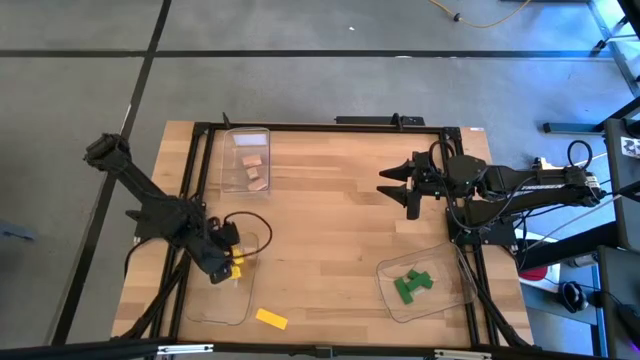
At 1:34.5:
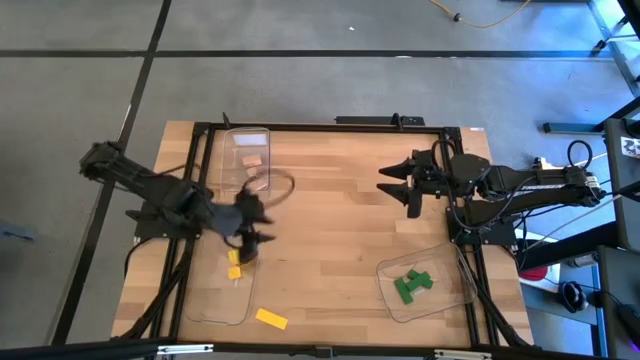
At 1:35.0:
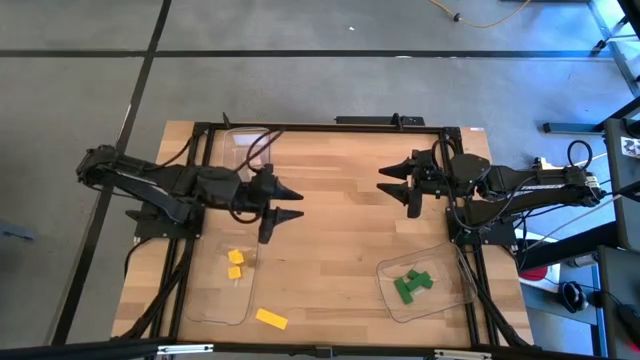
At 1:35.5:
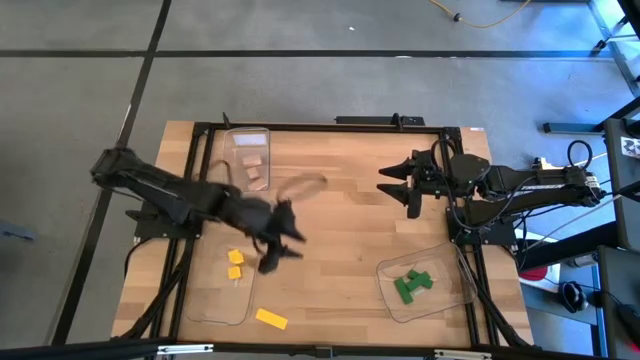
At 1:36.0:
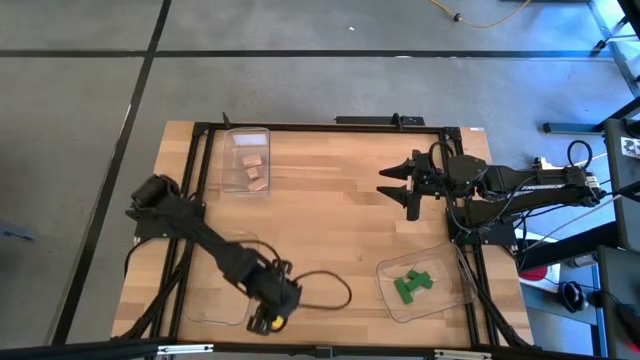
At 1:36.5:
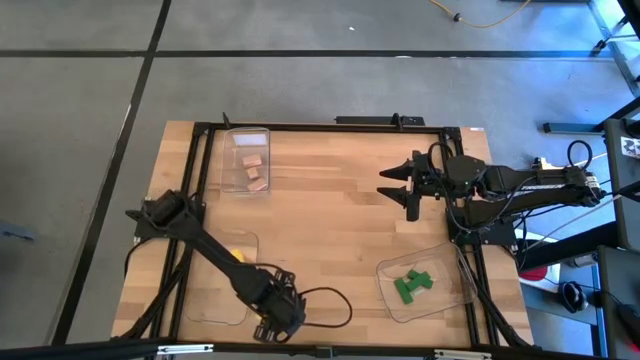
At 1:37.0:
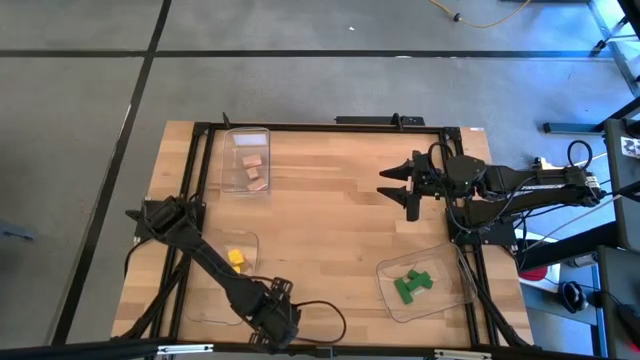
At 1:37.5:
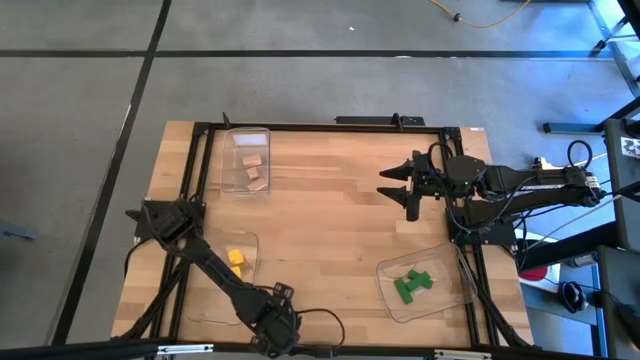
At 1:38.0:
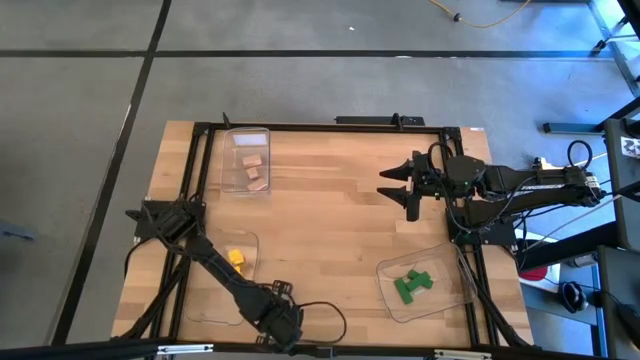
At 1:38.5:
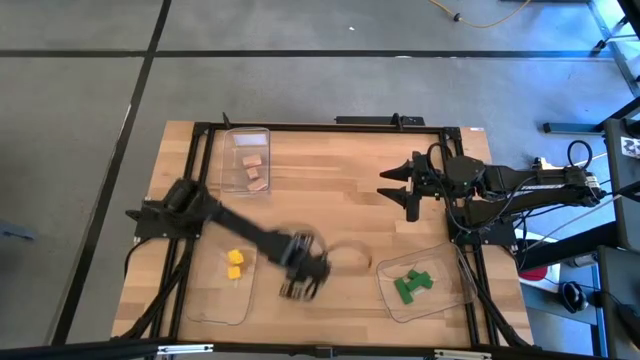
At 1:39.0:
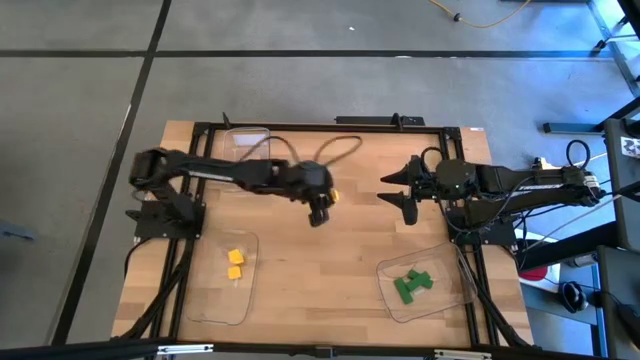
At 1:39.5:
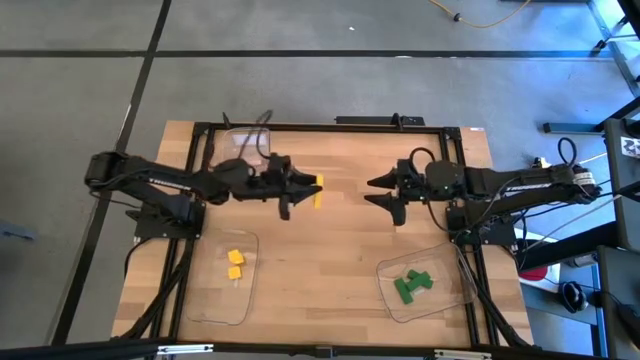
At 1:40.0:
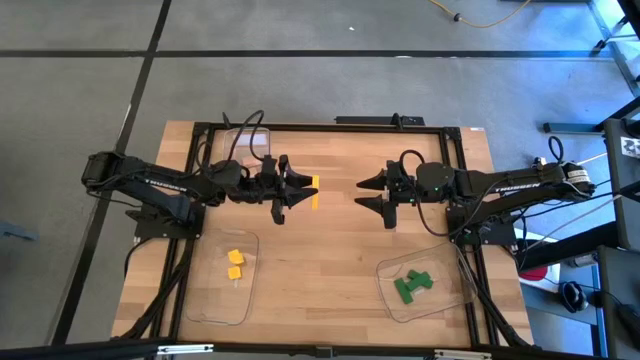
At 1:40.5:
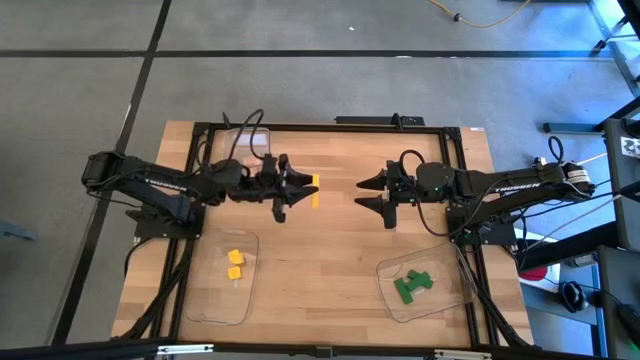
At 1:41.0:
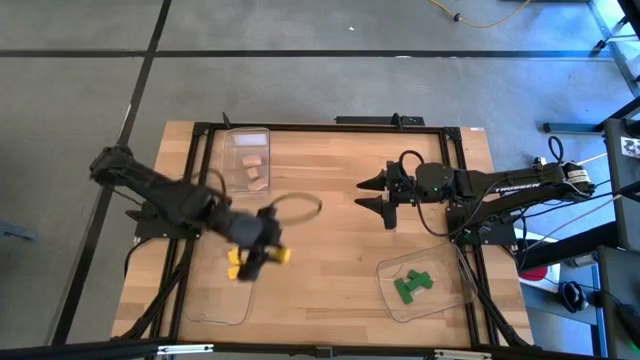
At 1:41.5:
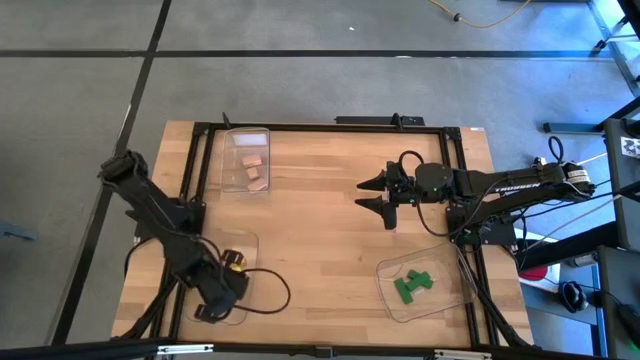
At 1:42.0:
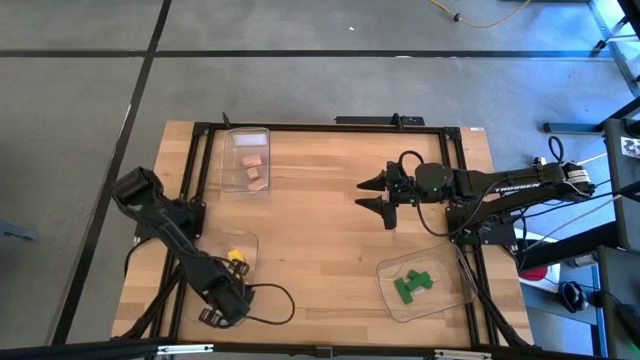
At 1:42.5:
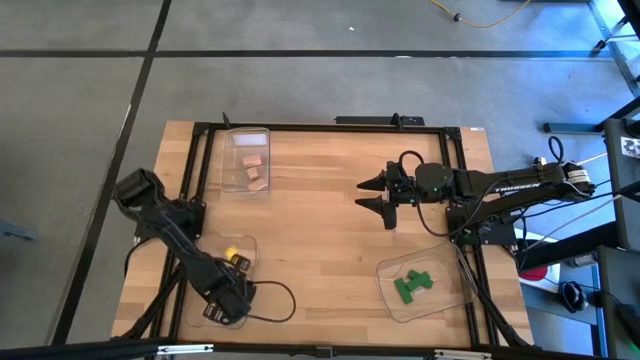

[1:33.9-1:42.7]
Task: Sort & place blocks by color
Put the bottom yellow block into the bottom left transparent bin

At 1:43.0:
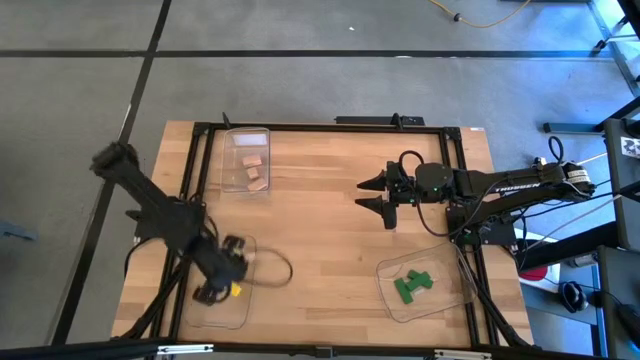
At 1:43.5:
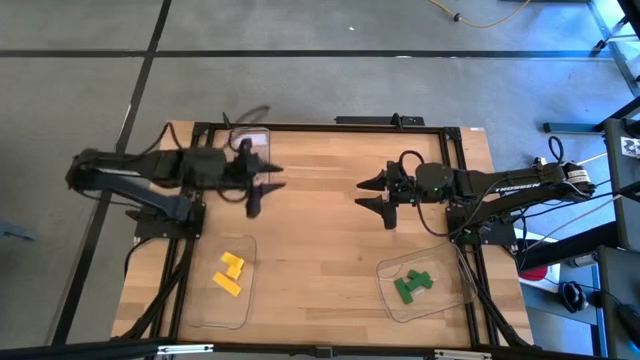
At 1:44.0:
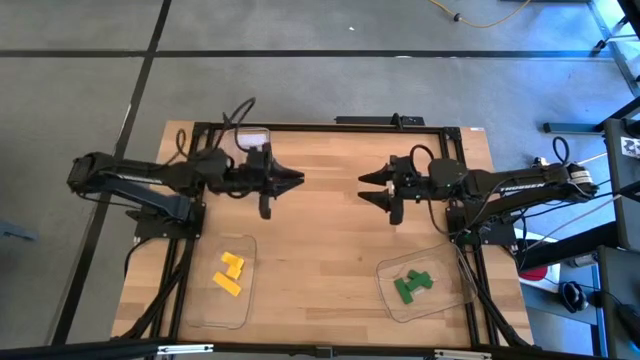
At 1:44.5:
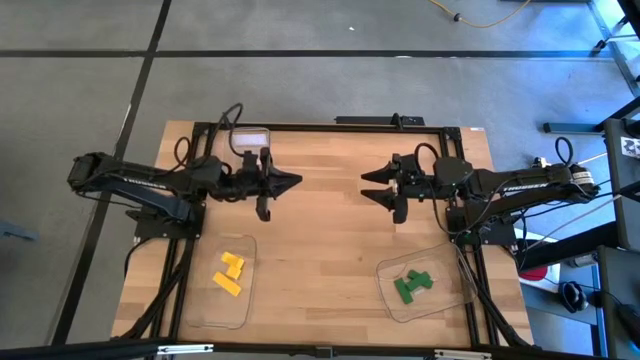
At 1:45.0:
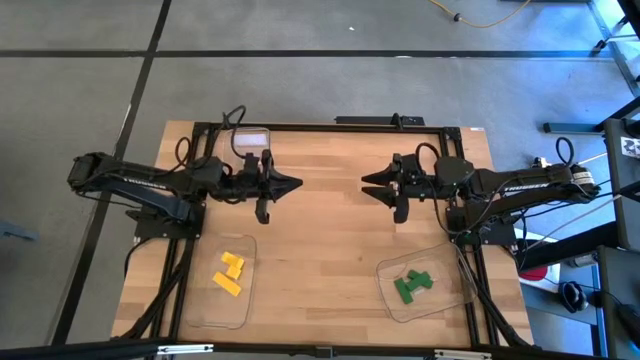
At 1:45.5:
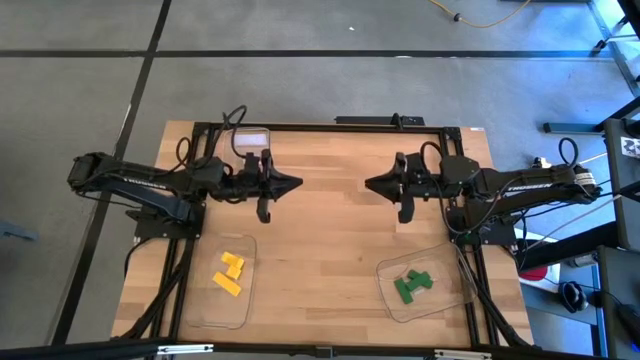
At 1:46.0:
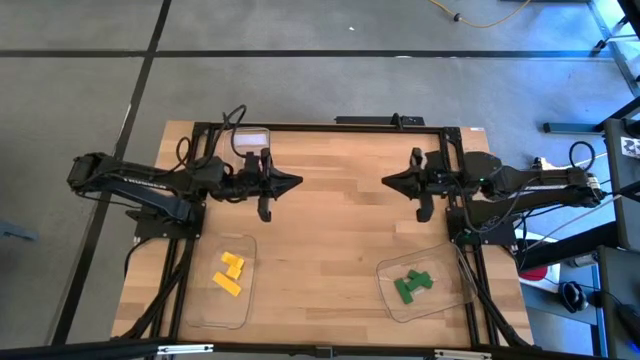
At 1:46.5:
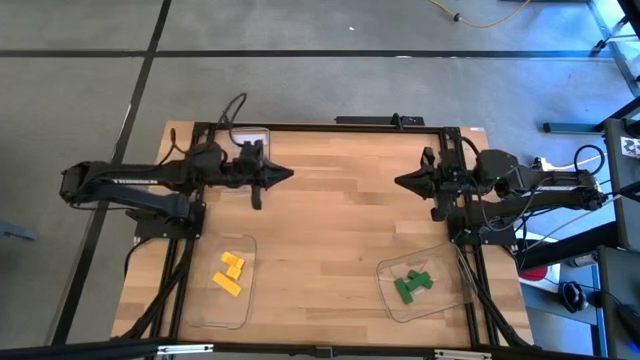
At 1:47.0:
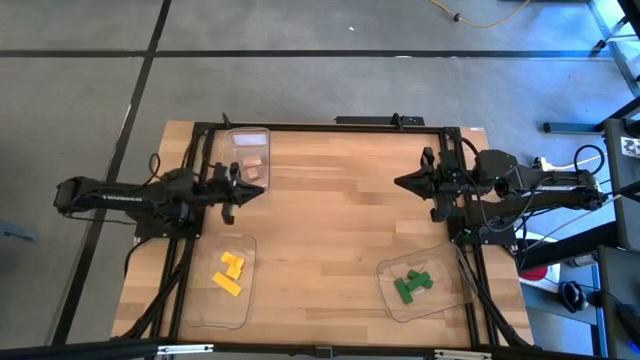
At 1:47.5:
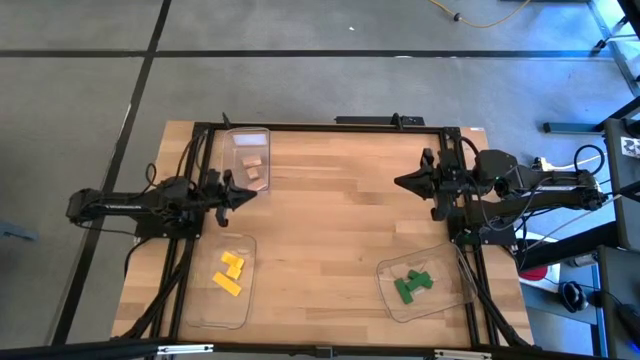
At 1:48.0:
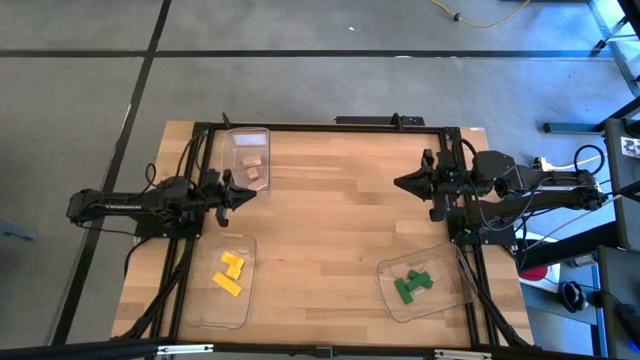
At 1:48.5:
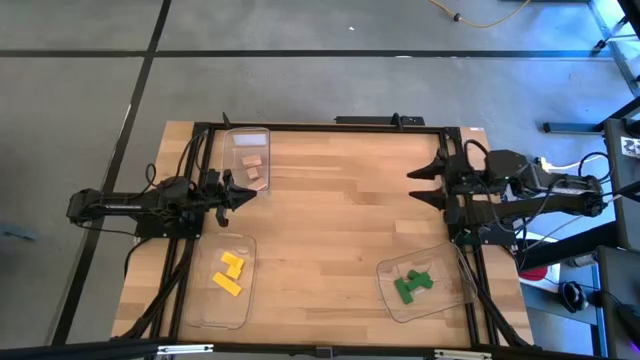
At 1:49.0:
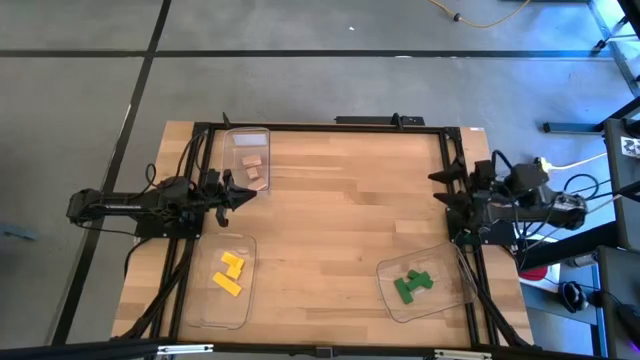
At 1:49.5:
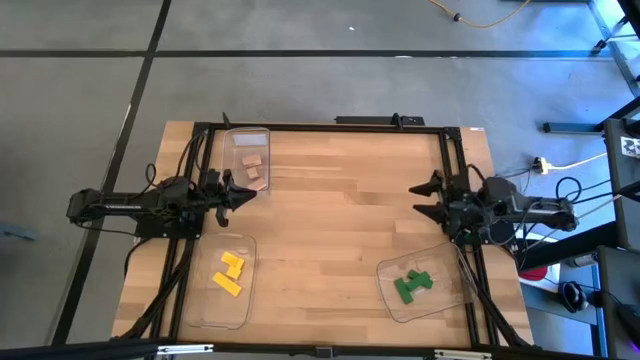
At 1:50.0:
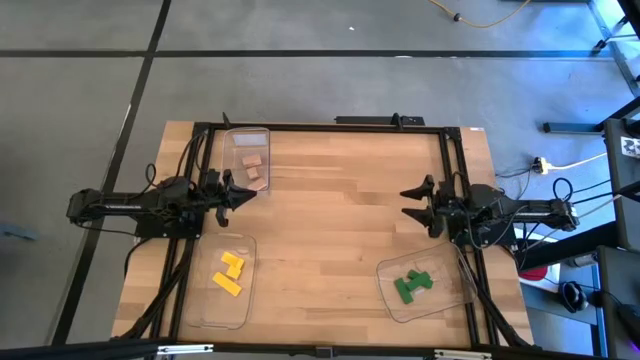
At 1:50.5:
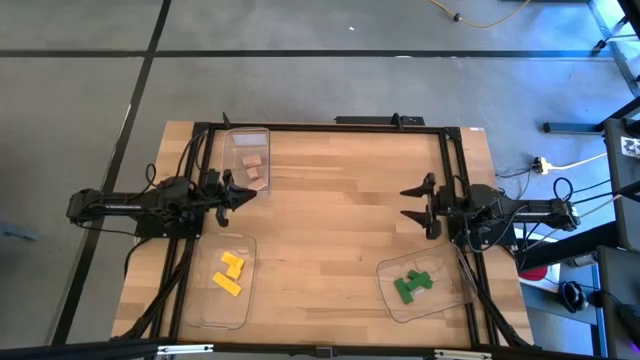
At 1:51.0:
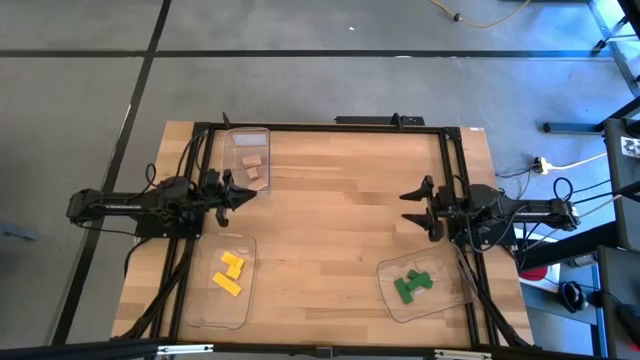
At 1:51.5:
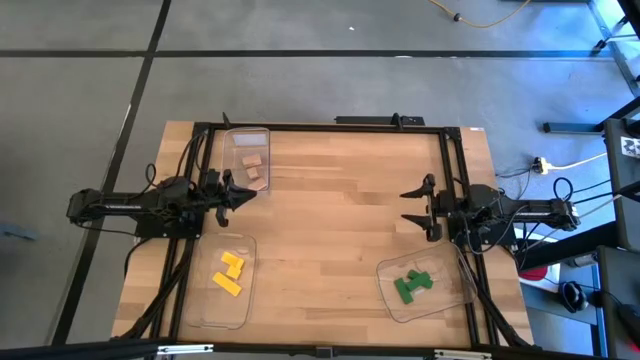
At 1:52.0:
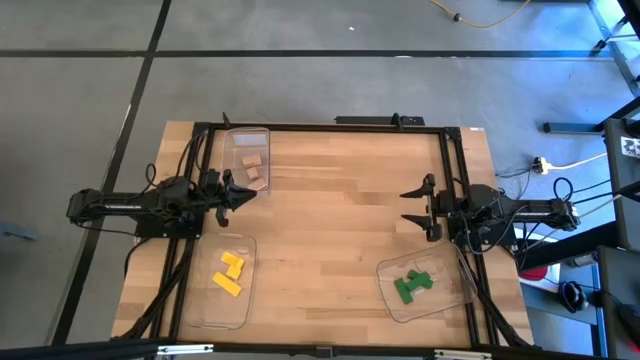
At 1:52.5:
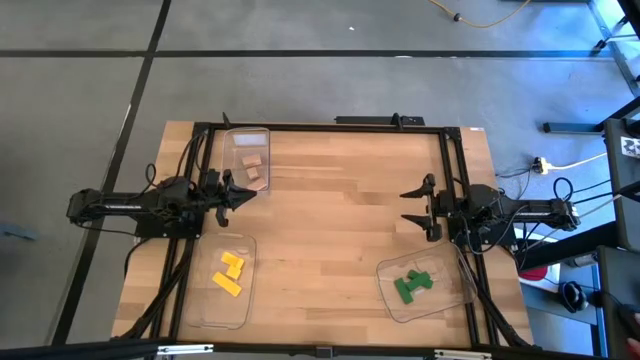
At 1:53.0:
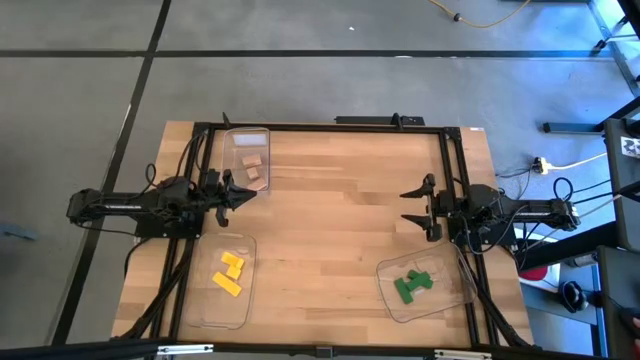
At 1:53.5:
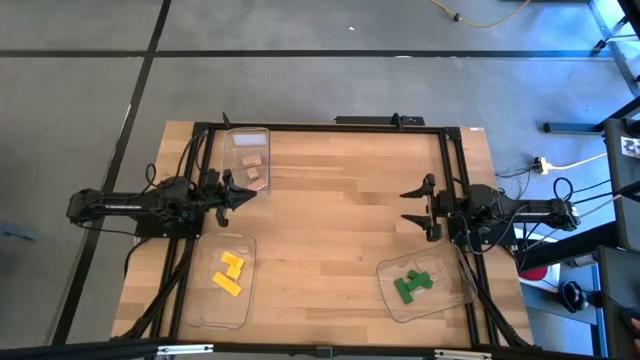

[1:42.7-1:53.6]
Return to Home Position

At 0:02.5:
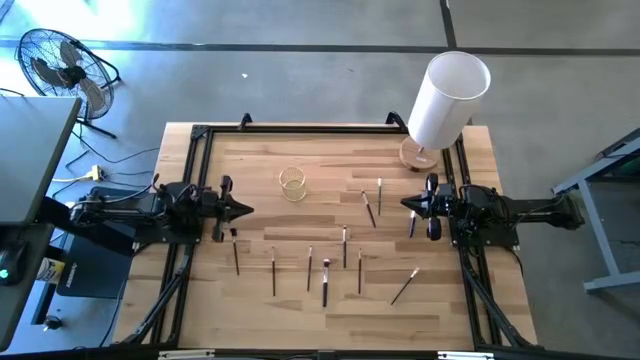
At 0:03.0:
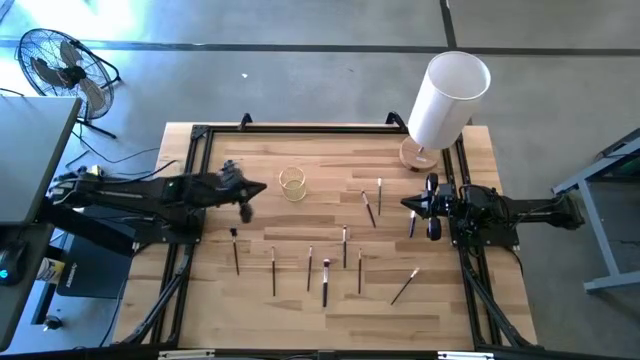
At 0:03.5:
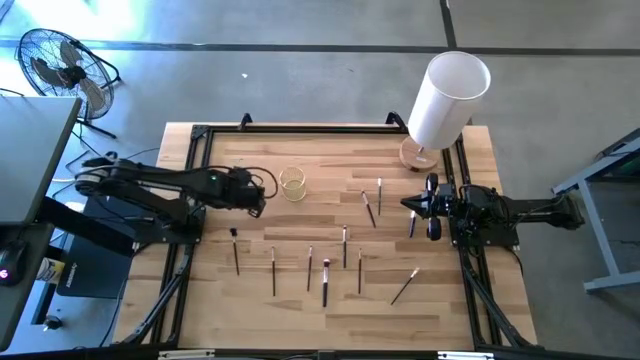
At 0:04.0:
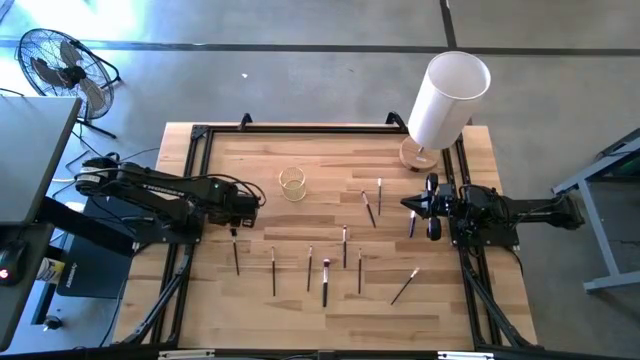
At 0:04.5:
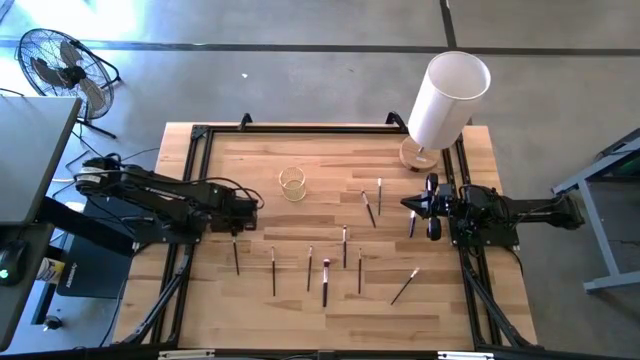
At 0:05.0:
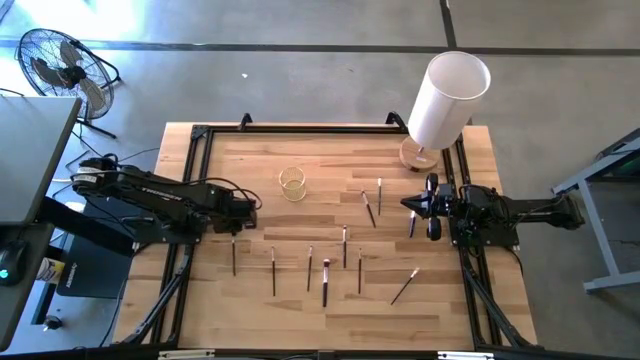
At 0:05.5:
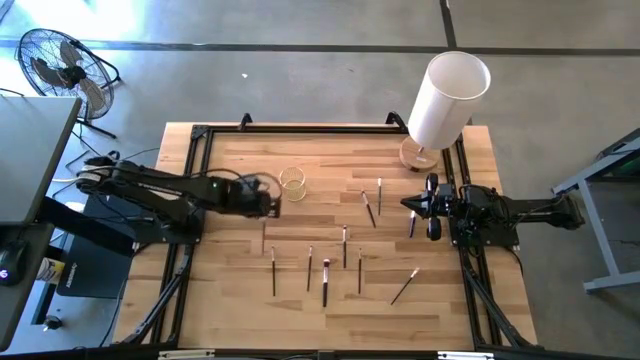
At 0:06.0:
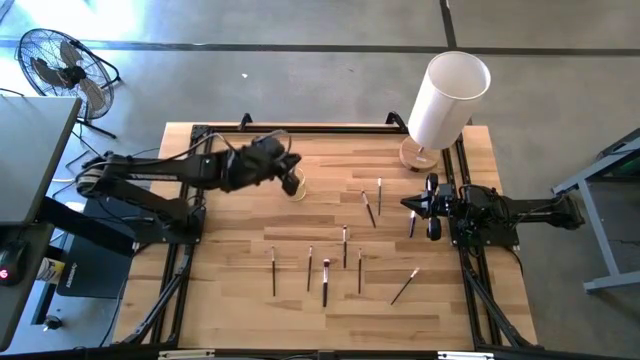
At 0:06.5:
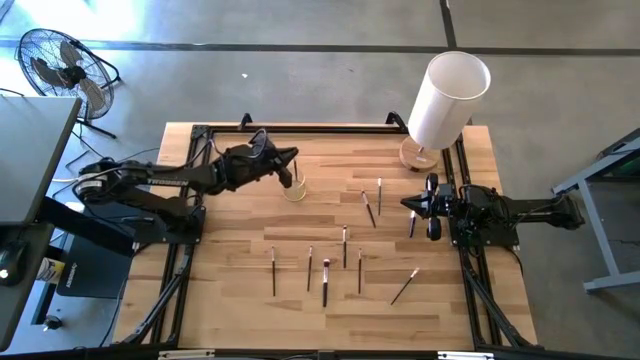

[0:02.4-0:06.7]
Task: Put items in baskets/containers
Put the eyebrow brush into the wire organizer
